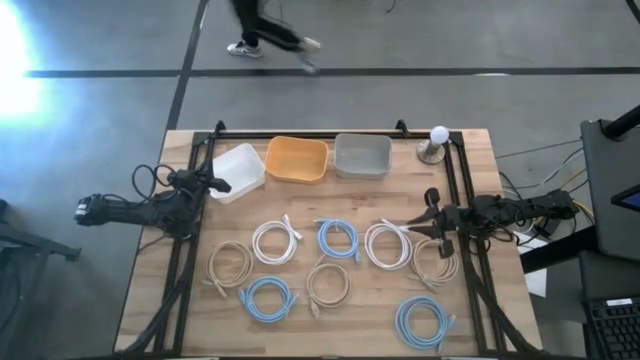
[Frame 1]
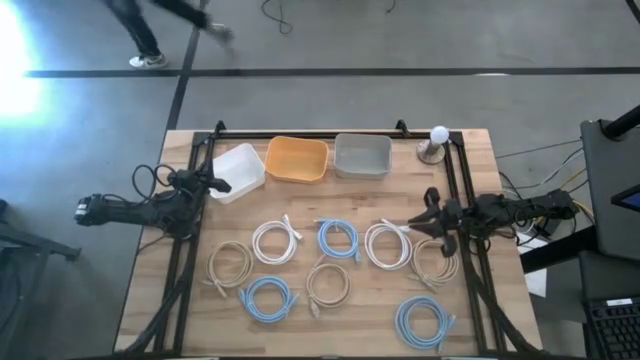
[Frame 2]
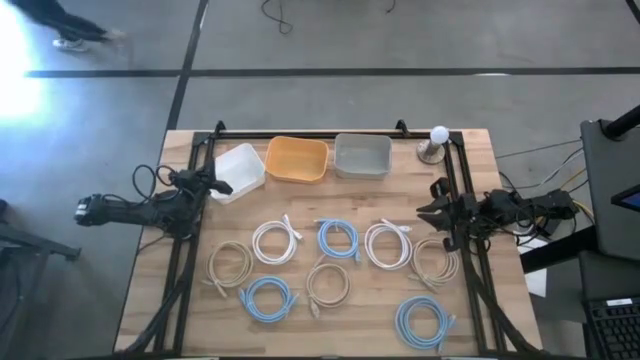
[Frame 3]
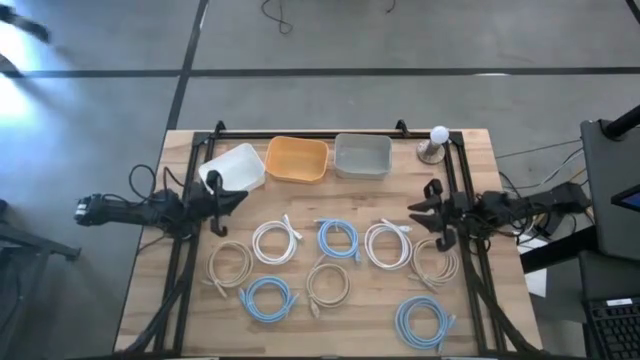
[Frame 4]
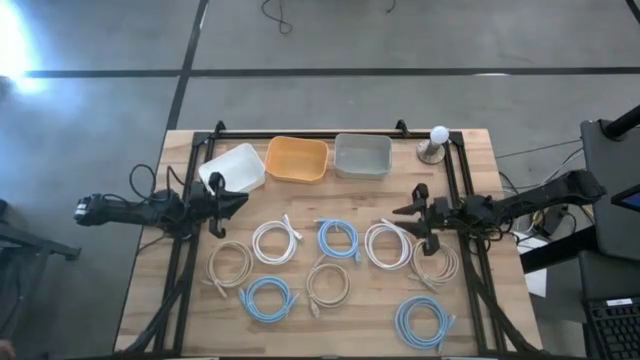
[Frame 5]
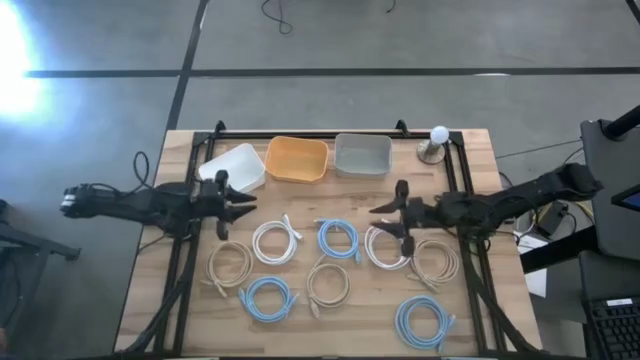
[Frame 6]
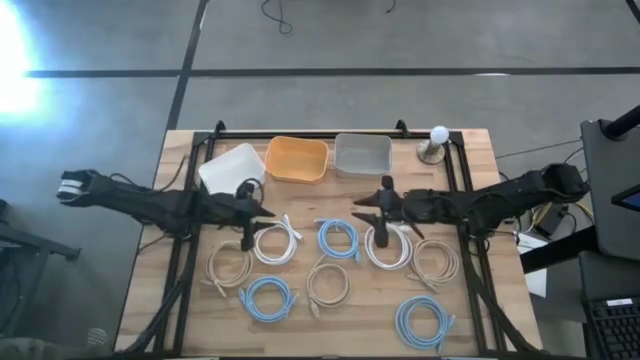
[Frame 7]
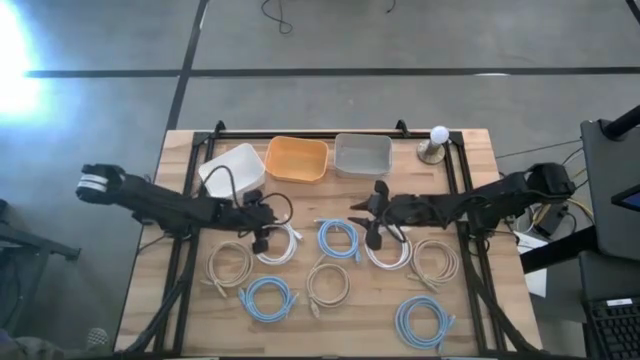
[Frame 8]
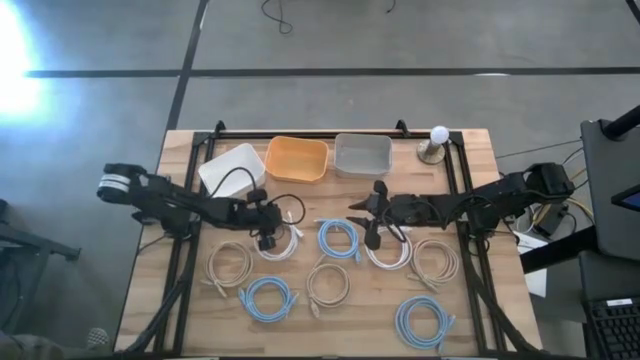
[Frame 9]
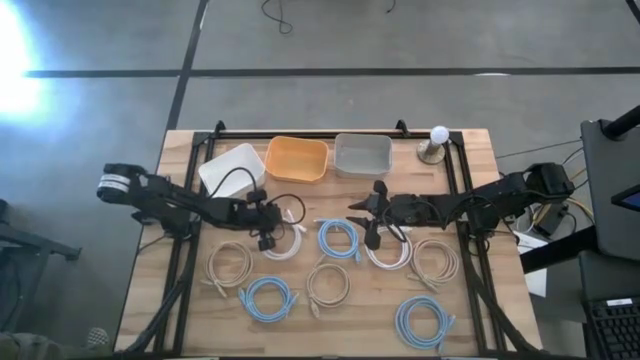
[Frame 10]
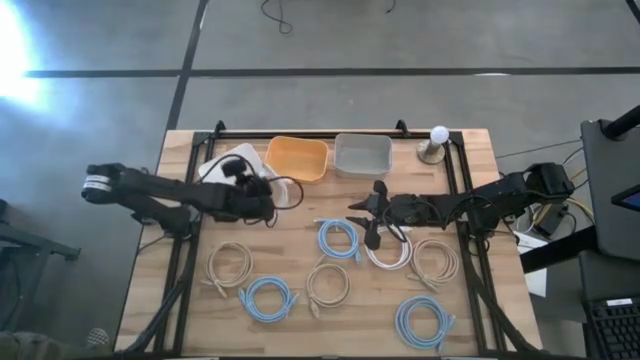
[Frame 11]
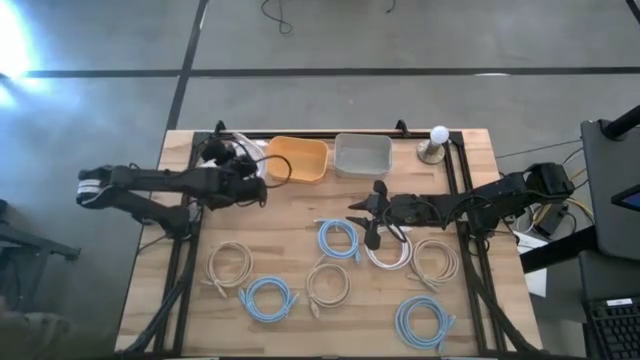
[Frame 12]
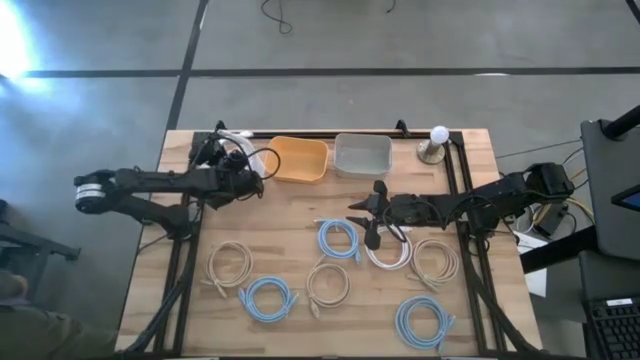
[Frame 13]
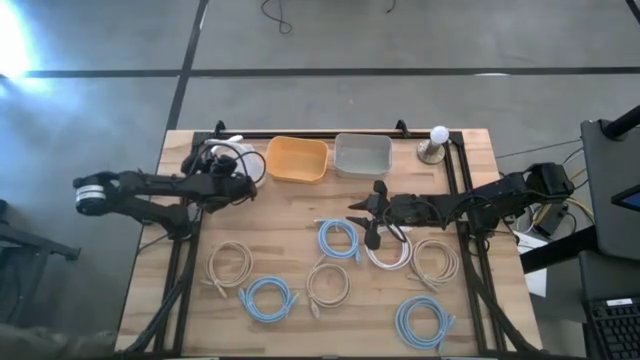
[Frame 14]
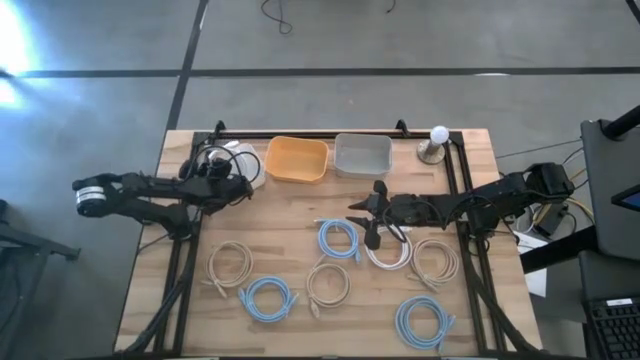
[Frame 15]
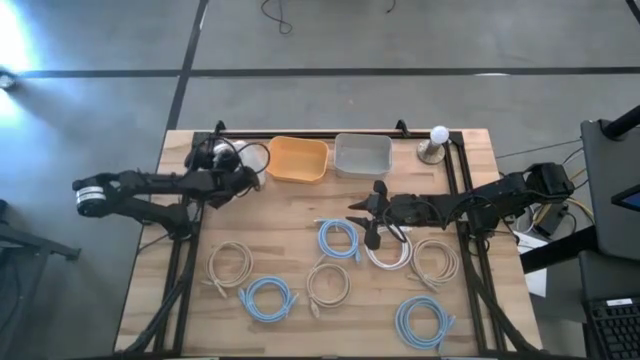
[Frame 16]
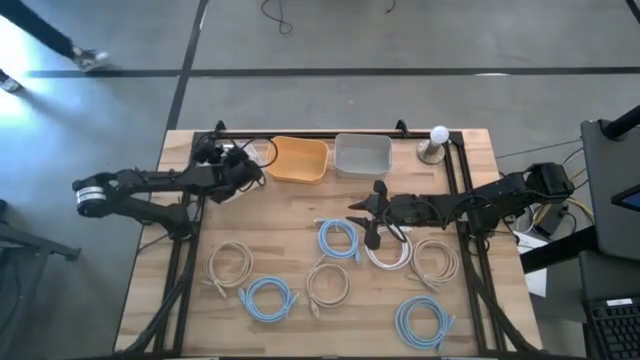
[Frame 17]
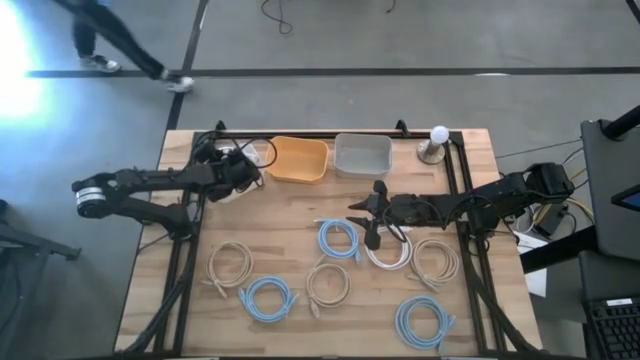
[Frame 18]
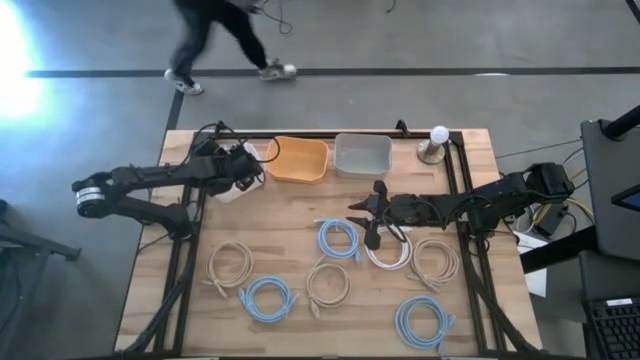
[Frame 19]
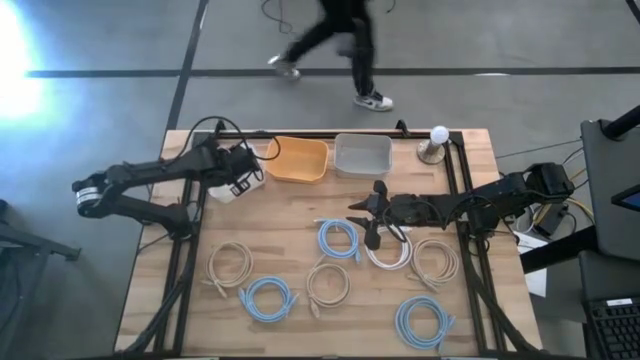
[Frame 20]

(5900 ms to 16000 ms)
Task: Pick & Place USB Port
Put the left white display cable into the white bin

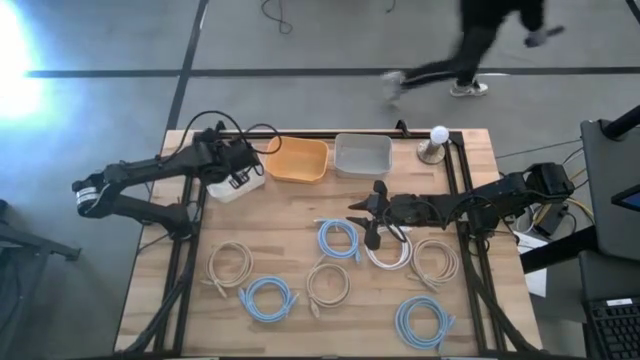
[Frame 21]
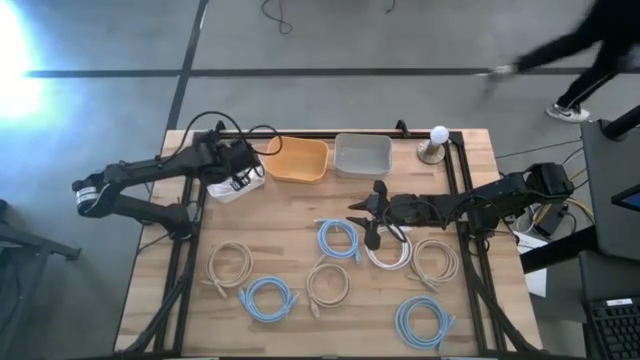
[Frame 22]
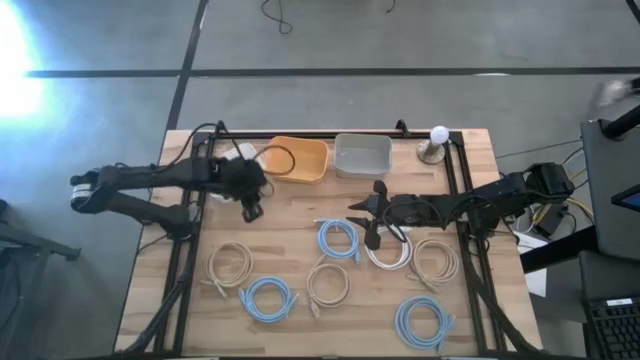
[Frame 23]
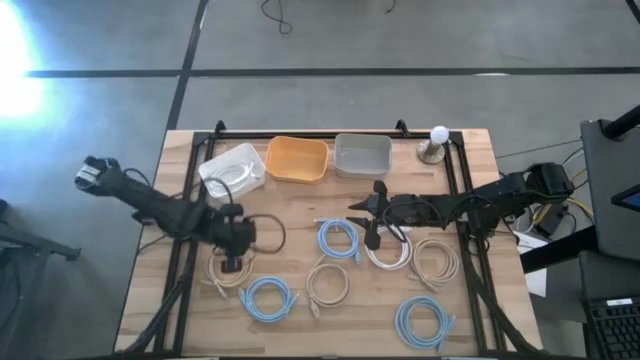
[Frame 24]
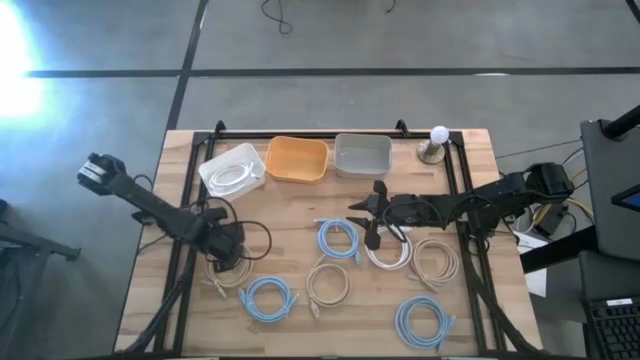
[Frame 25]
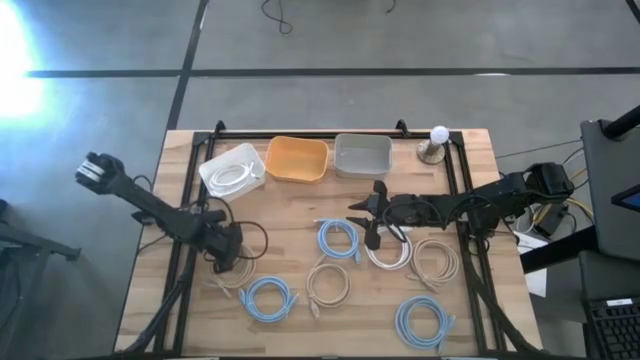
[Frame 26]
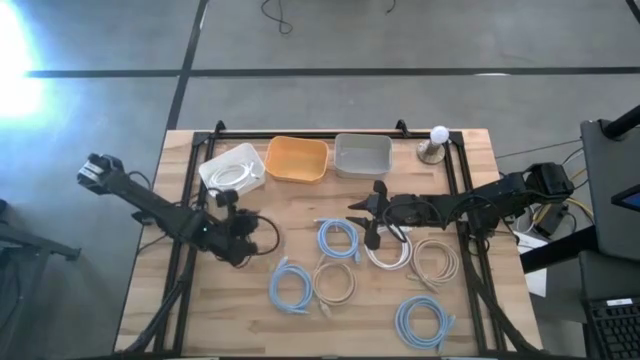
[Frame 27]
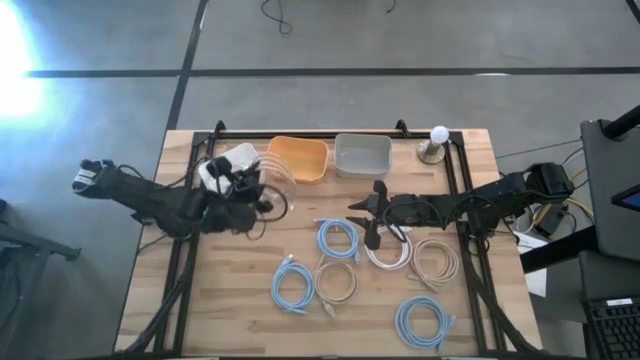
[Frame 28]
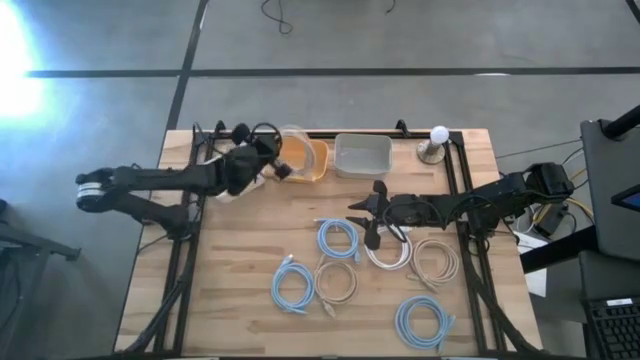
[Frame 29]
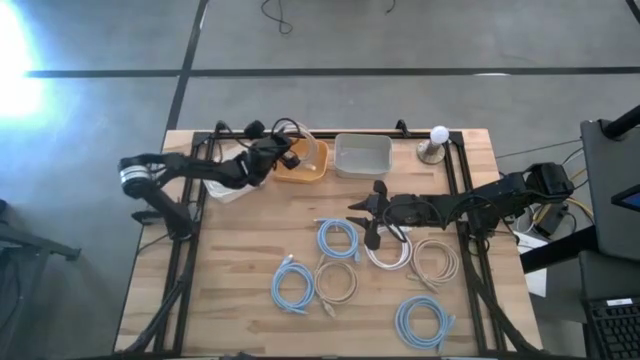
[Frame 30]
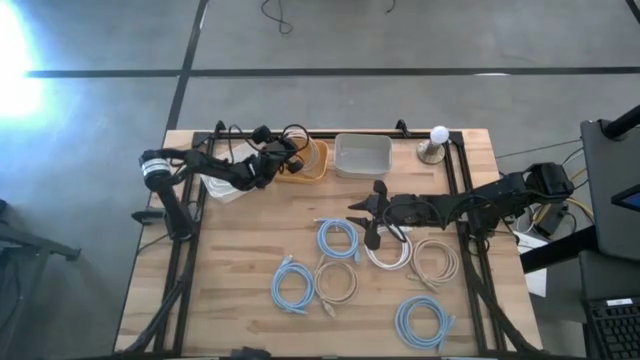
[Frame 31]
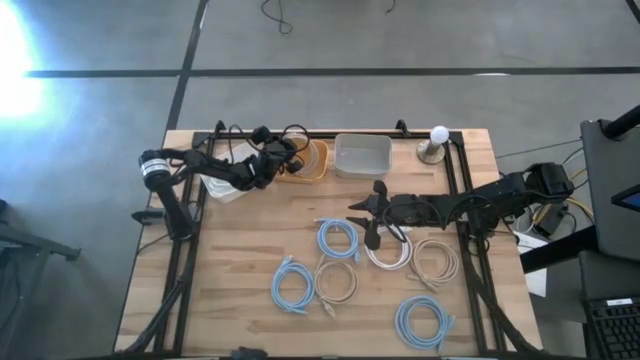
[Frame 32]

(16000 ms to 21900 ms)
Put the left brown display cable into the yellow bin

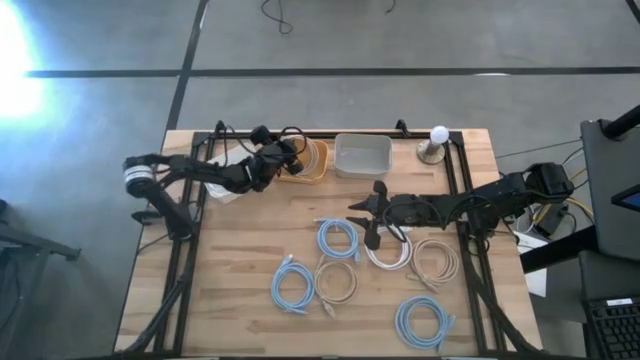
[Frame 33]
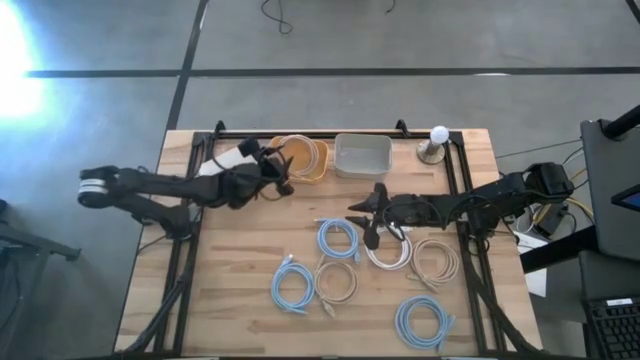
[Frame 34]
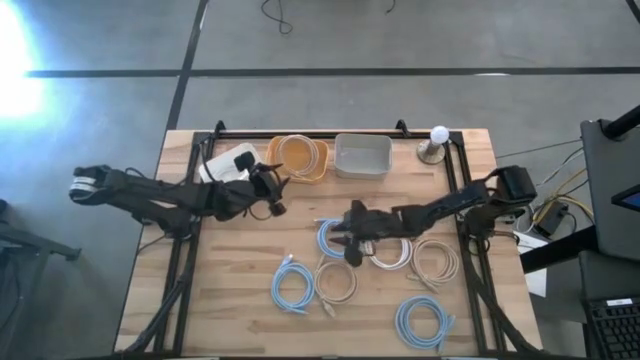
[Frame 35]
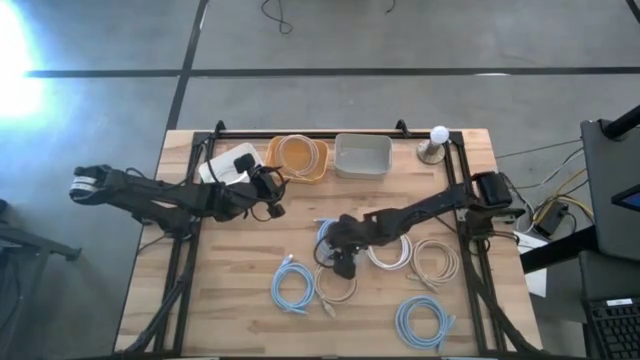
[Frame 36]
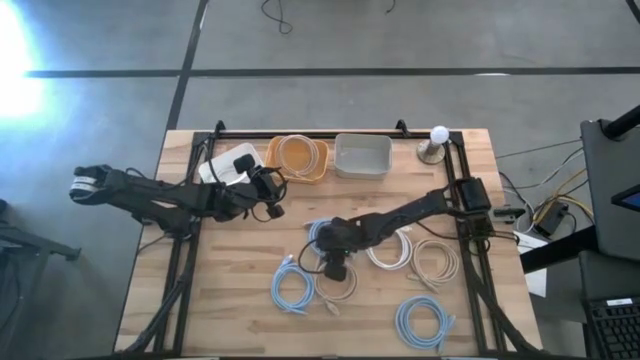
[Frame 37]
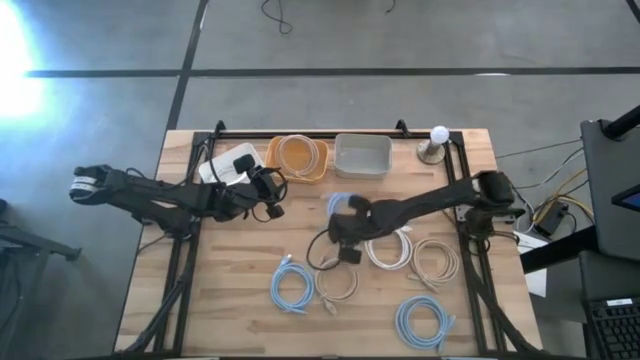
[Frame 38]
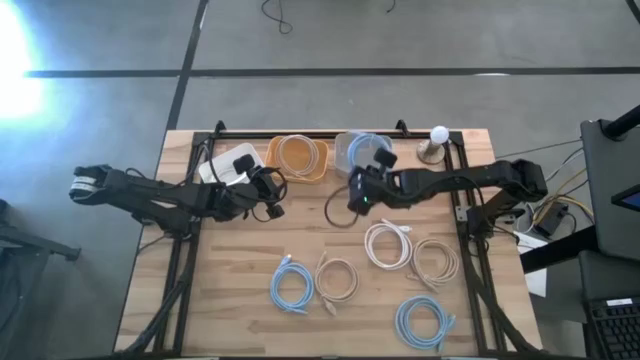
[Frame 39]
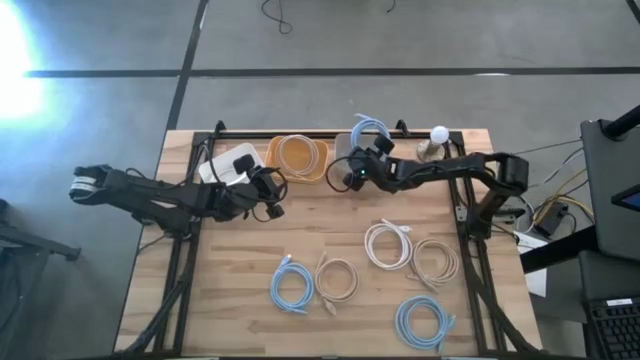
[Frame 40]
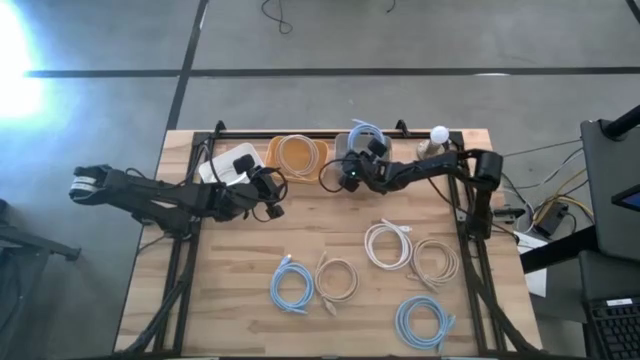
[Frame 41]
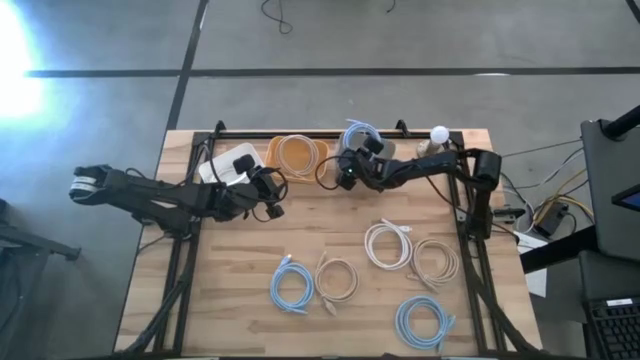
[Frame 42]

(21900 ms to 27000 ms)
Put the top blue display cable into the gray bin

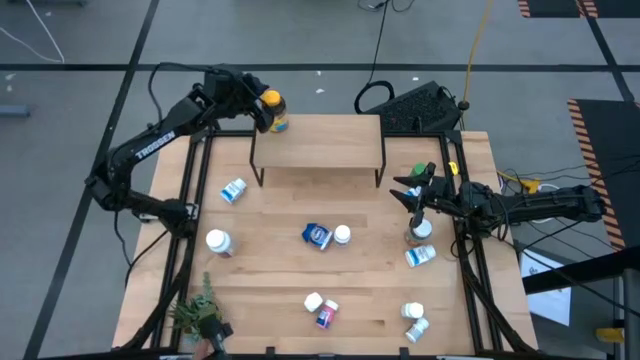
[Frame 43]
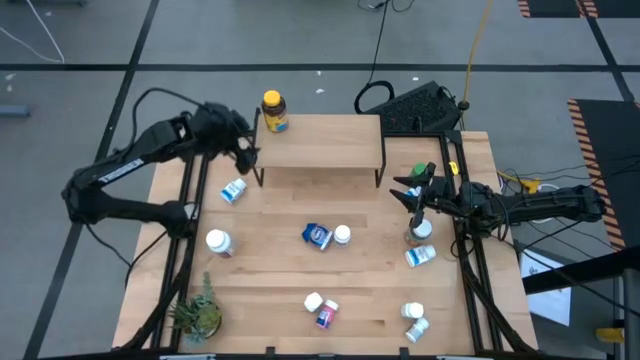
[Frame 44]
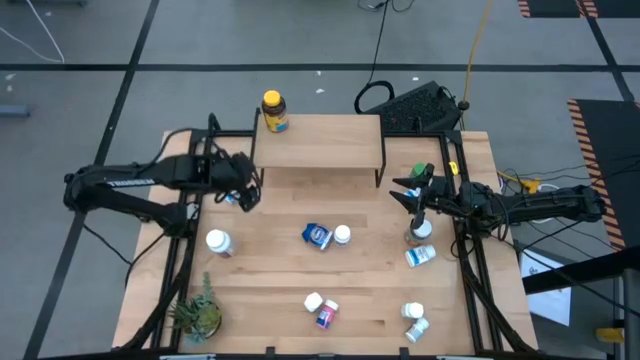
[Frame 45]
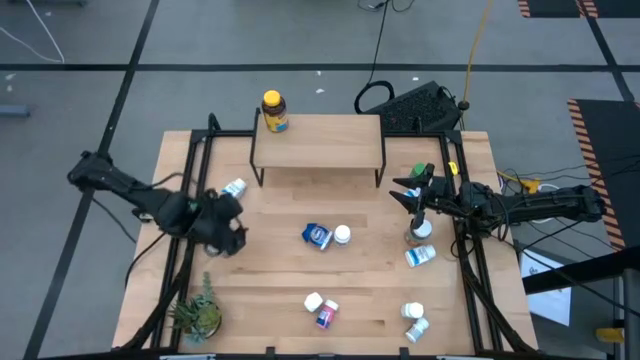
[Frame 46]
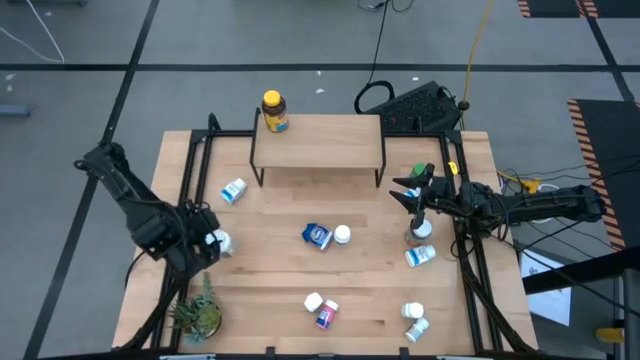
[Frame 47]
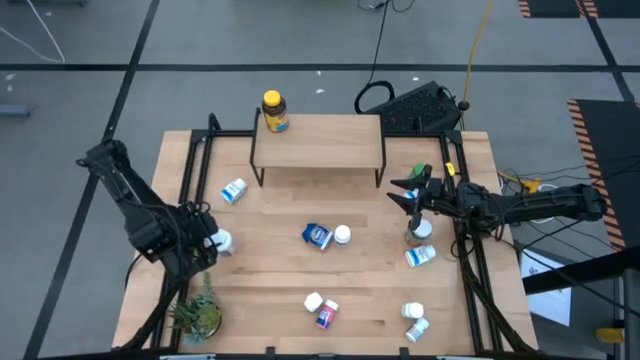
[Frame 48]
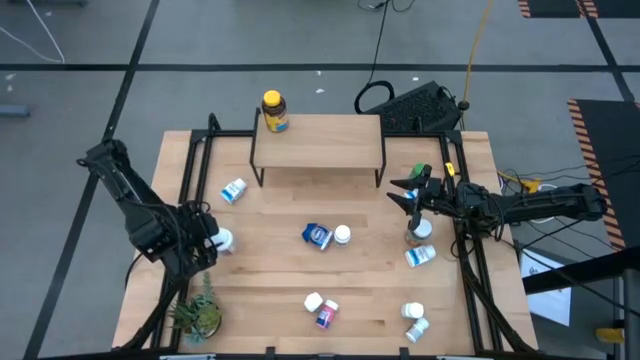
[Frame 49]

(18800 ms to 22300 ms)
Task: Pick and place medicine bottles onto shelf by color
Put the white medicine bottle on the shelf
